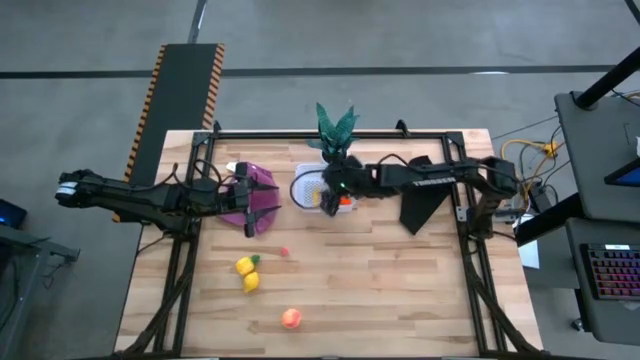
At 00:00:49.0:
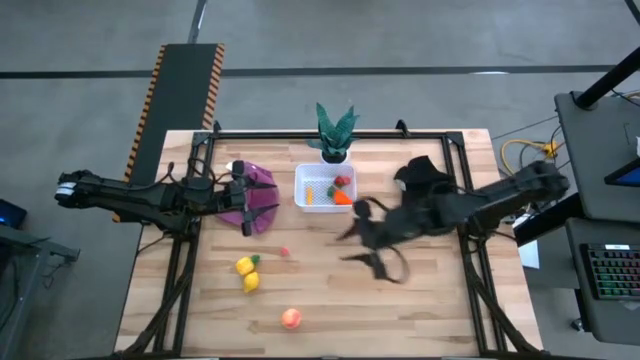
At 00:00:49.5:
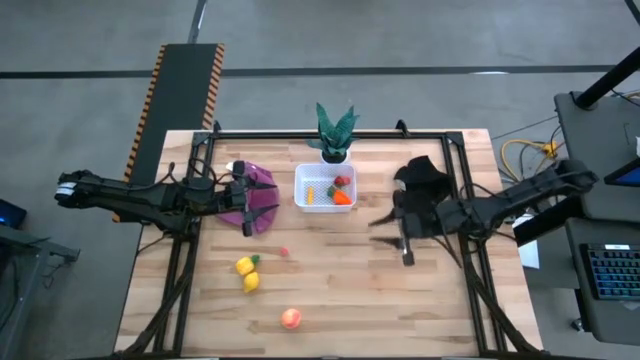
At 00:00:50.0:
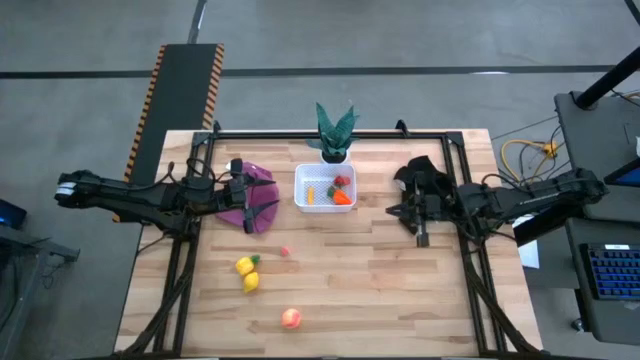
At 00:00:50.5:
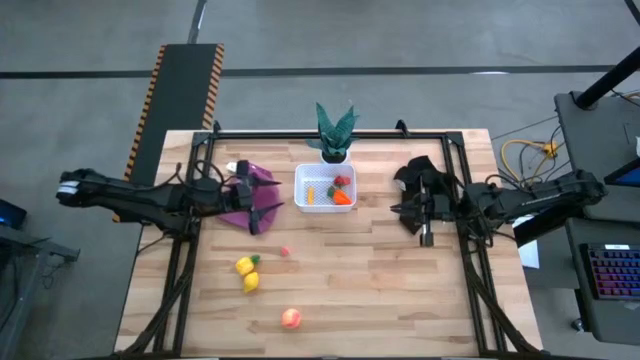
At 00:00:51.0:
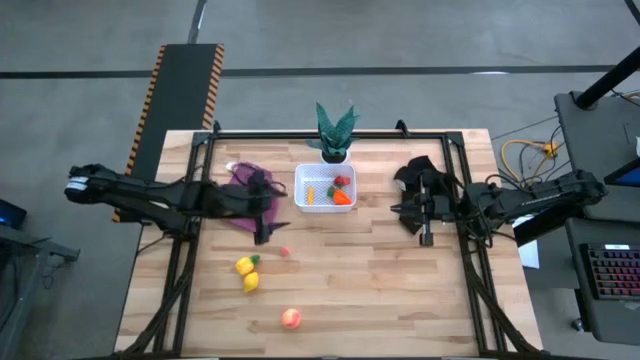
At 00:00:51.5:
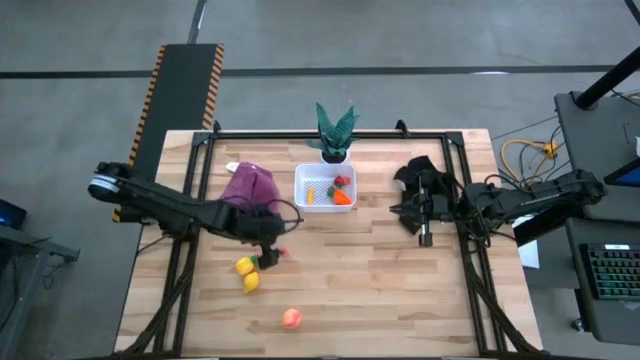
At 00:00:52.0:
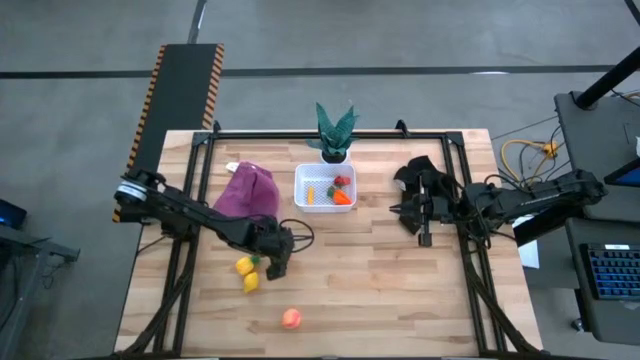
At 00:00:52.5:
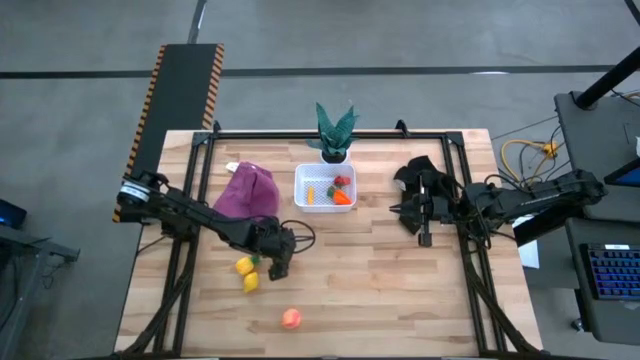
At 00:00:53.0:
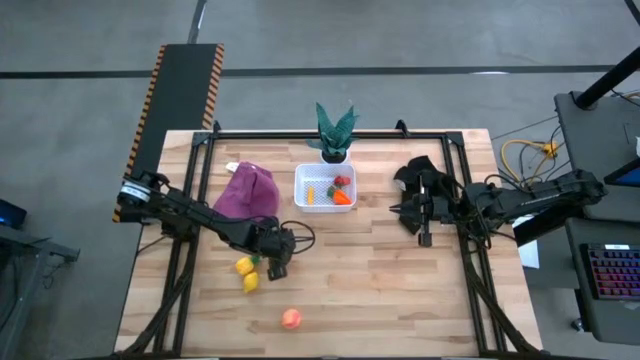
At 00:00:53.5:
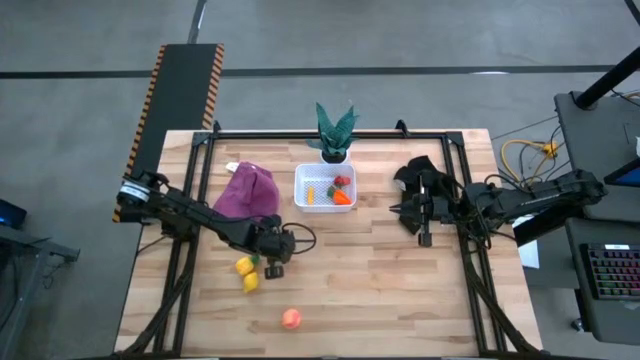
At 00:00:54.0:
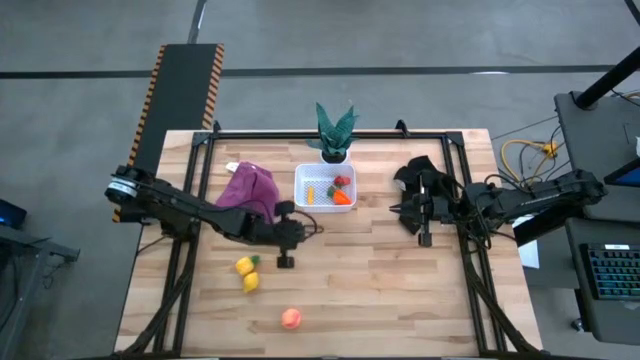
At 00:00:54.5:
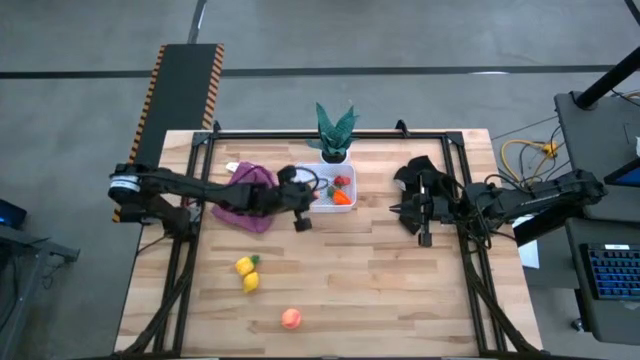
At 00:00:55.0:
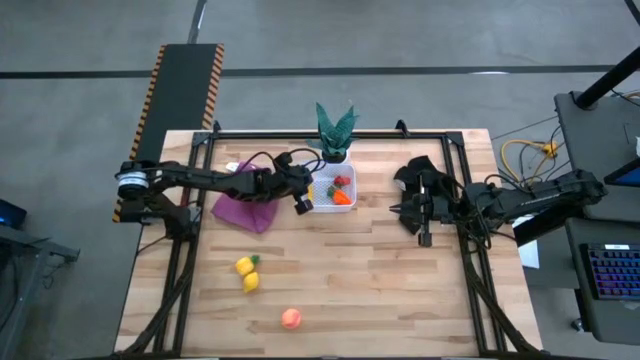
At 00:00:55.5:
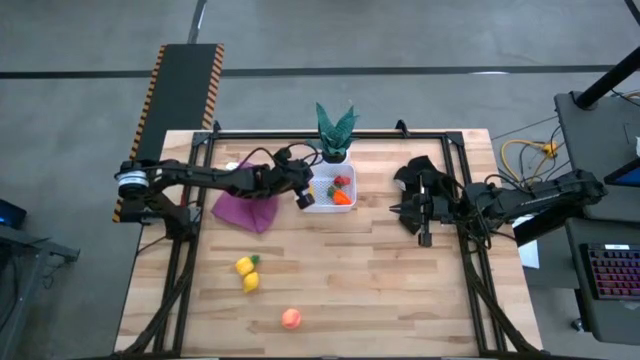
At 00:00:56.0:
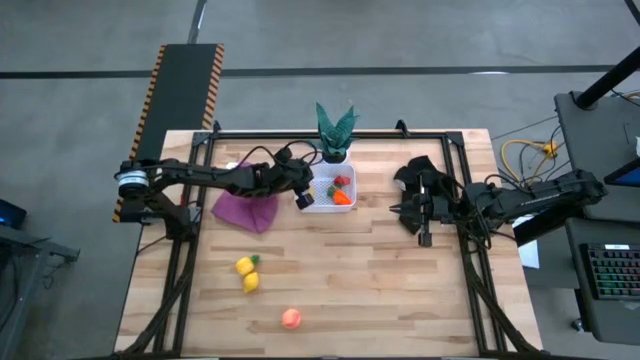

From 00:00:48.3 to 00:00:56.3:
Task: Build produce basket
Put the apricot into the white basket

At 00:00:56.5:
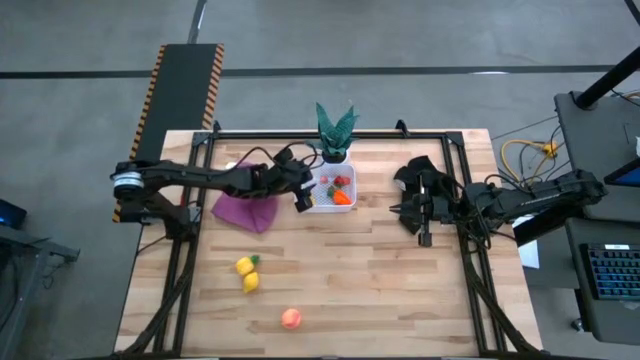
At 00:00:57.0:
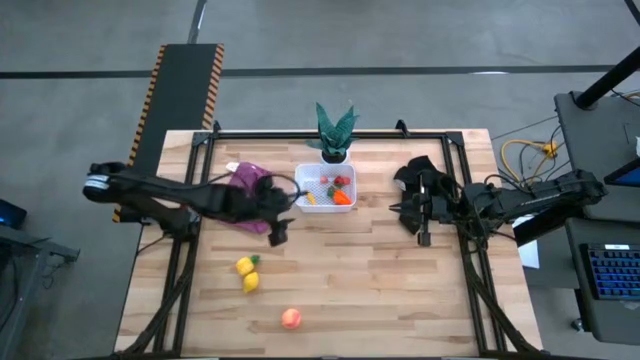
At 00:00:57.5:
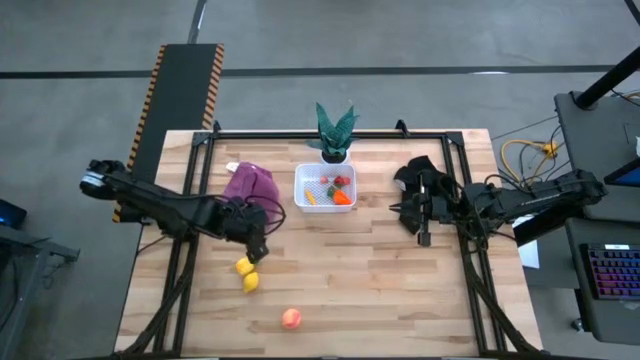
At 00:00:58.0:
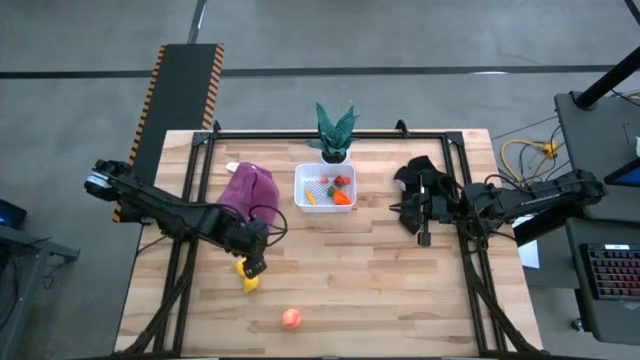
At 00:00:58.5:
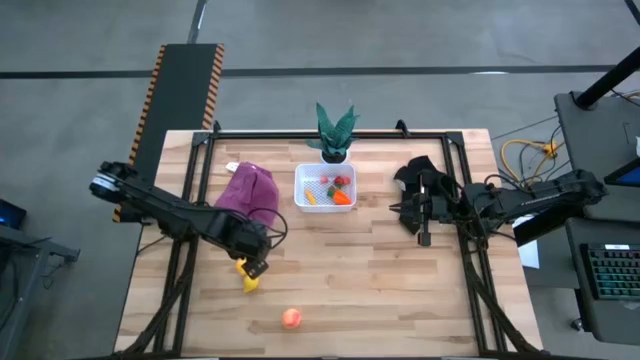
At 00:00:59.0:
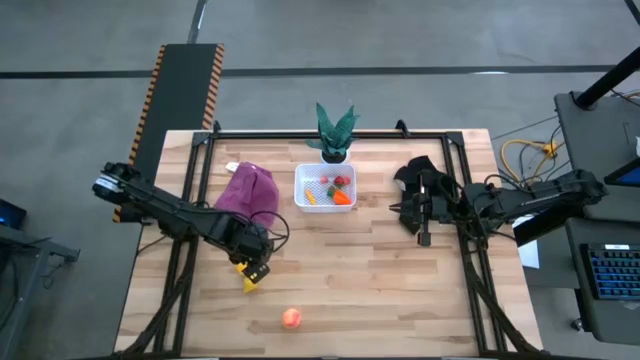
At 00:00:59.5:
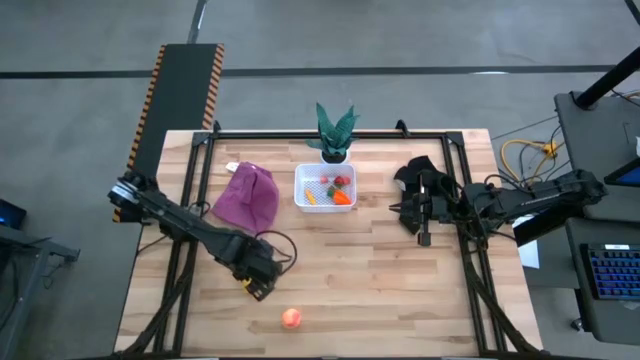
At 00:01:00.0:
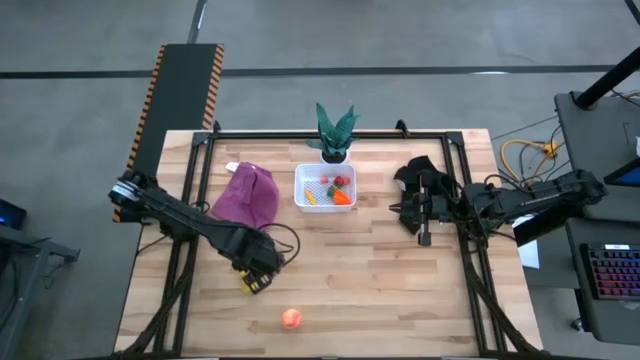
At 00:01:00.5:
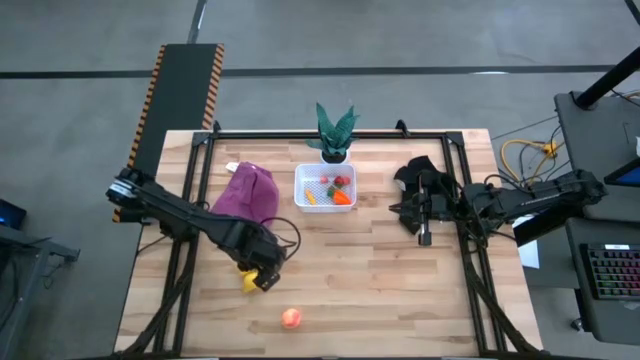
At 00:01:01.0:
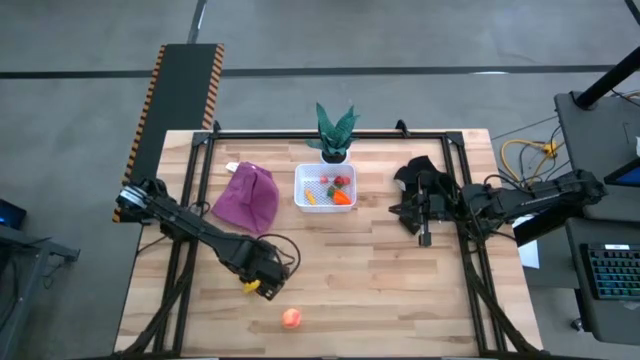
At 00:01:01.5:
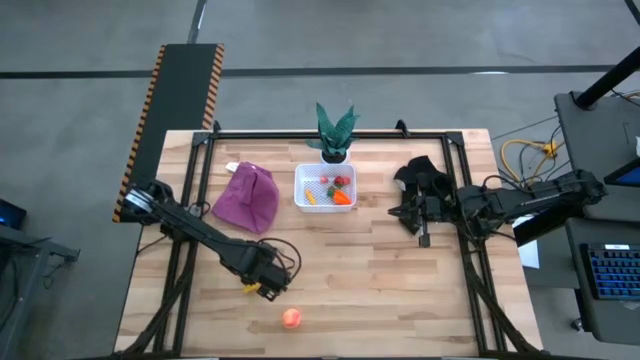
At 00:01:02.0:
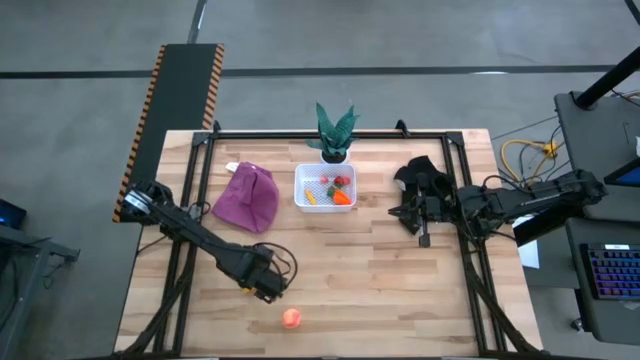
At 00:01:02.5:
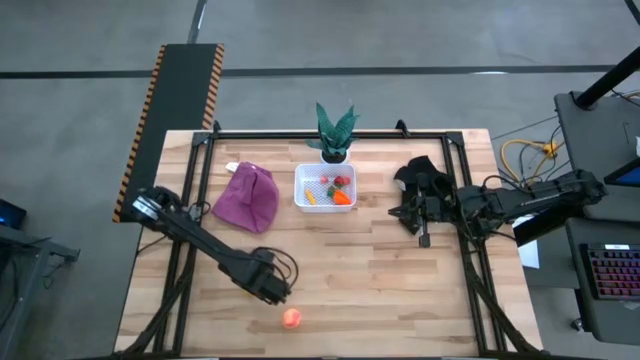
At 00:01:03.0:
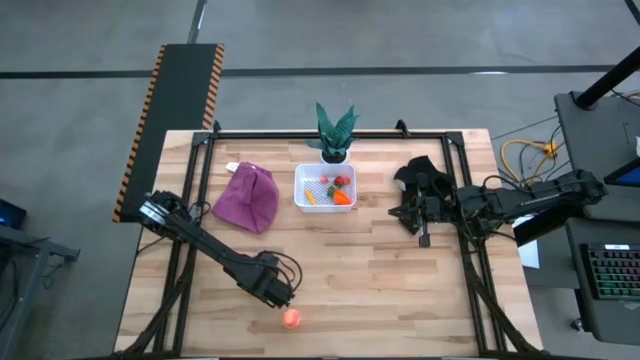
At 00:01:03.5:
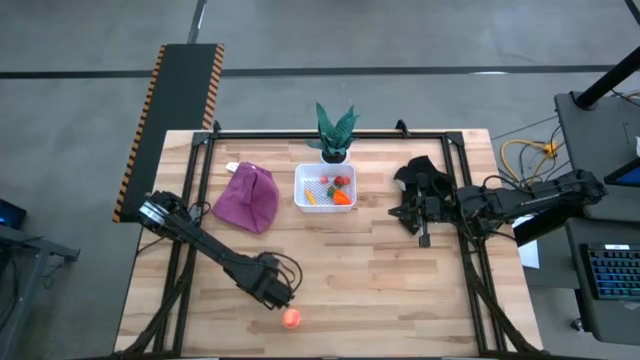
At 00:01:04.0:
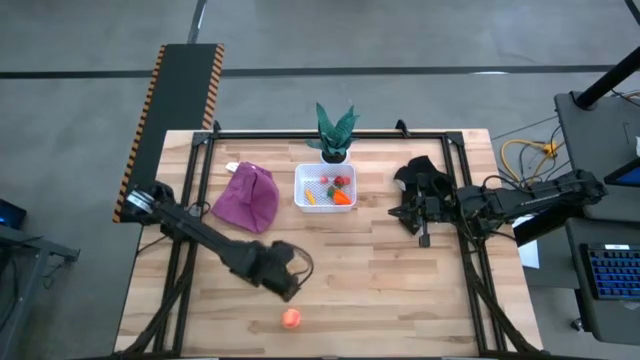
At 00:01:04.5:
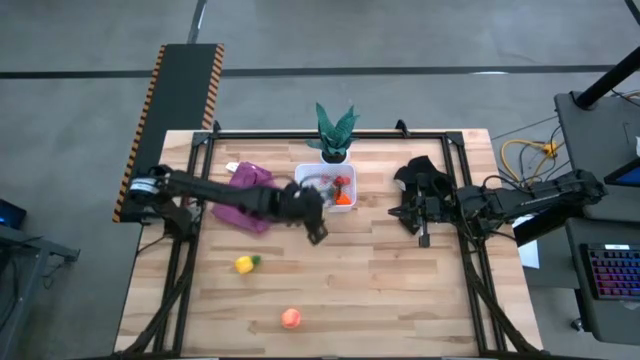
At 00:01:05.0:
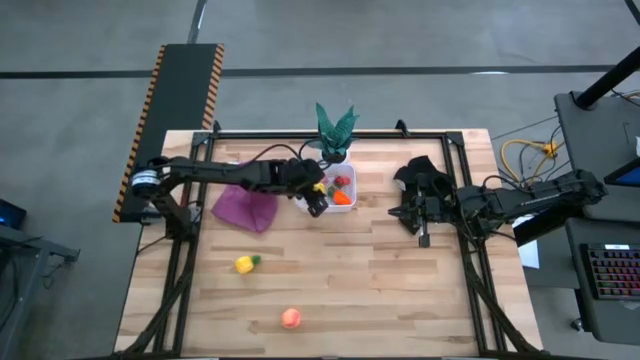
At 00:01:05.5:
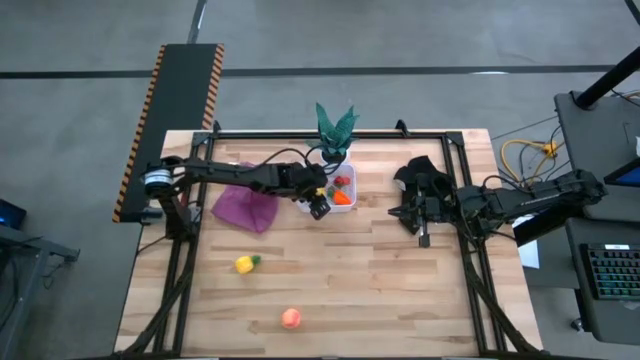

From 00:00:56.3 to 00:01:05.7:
Put the lemon into the white basket

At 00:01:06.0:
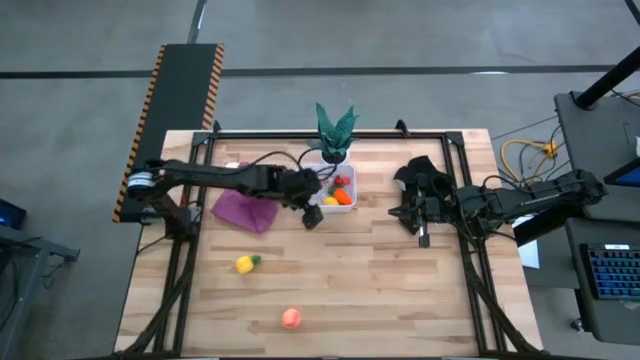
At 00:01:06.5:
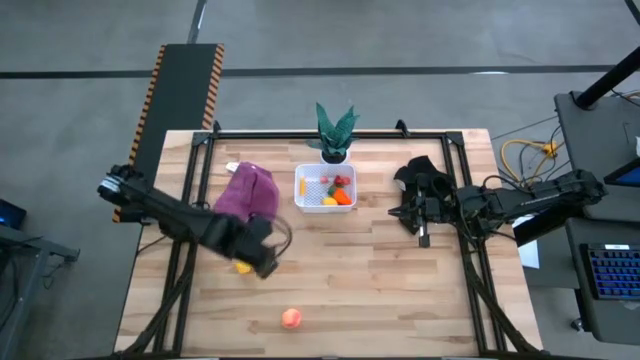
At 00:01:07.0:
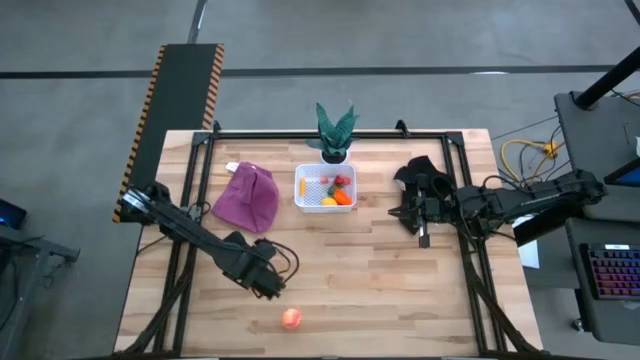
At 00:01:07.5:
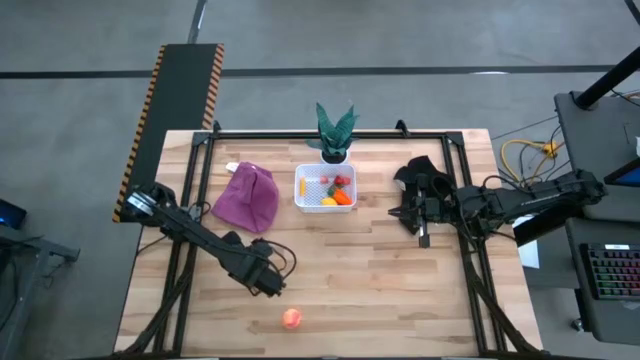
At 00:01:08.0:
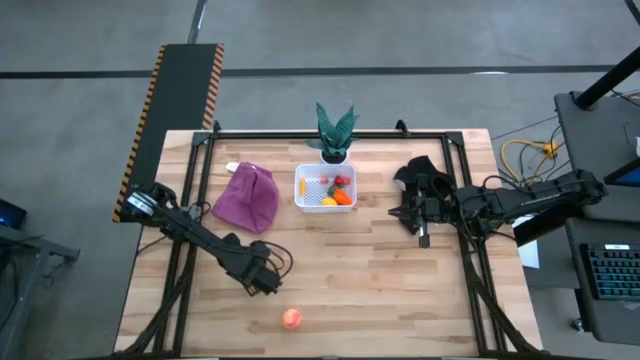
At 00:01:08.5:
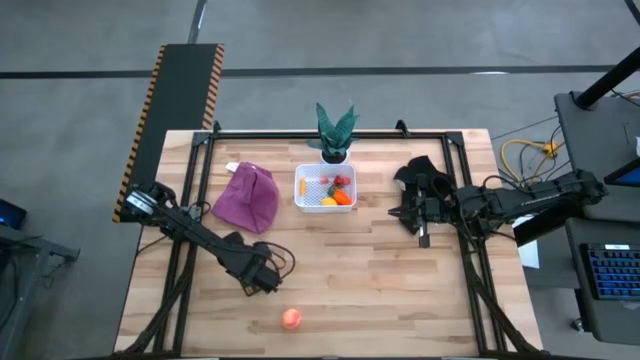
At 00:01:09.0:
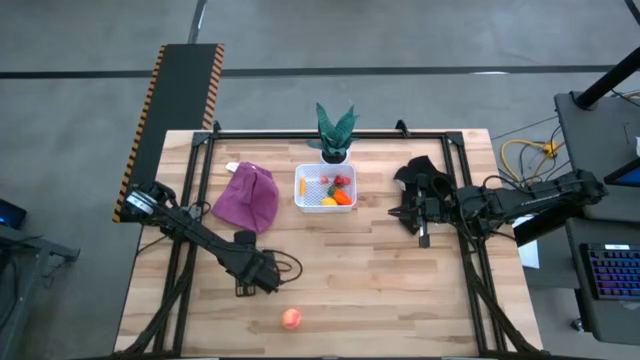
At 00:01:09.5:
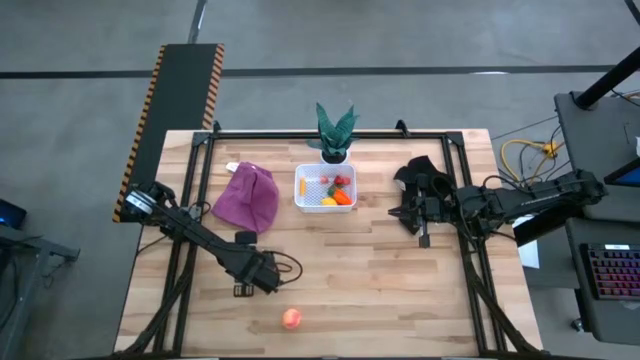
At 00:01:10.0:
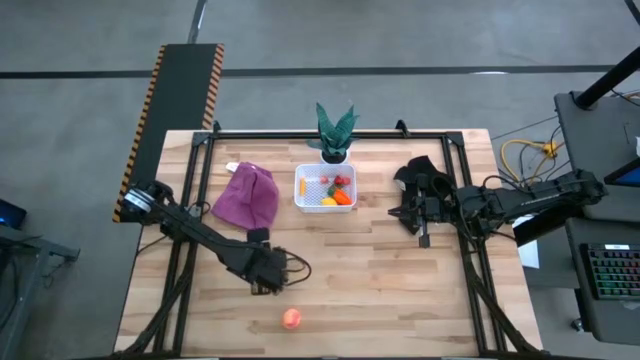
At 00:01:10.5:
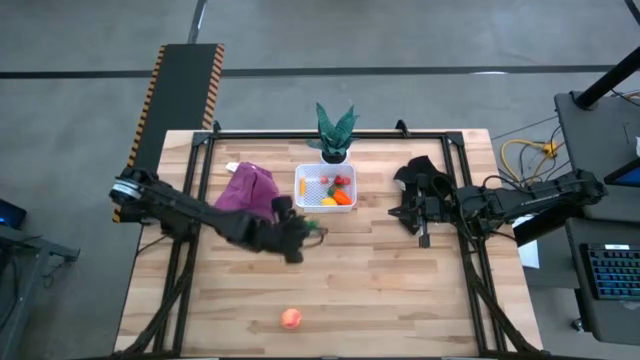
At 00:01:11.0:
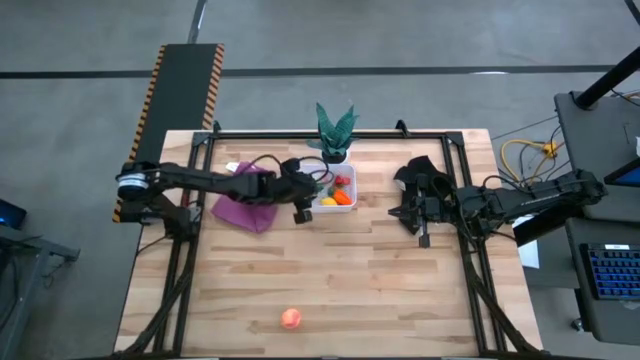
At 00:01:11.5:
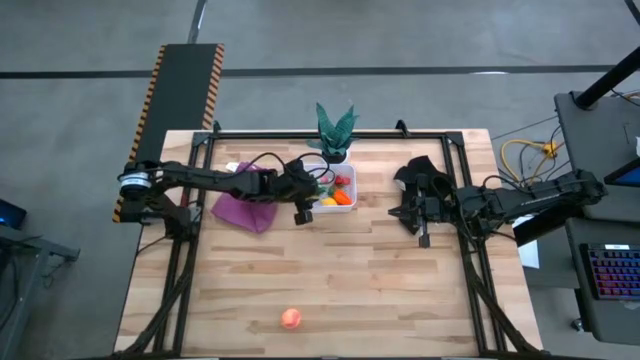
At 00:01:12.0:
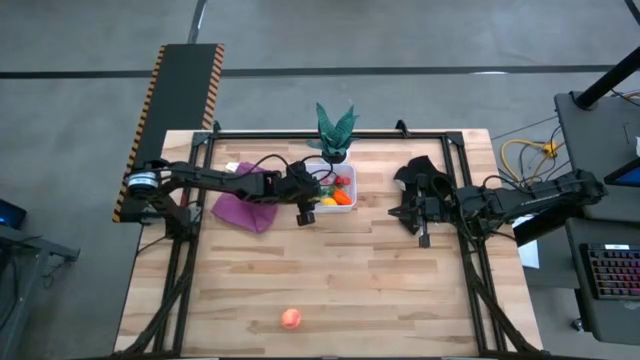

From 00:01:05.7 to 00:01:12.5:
Put the pineapple into the white basket
